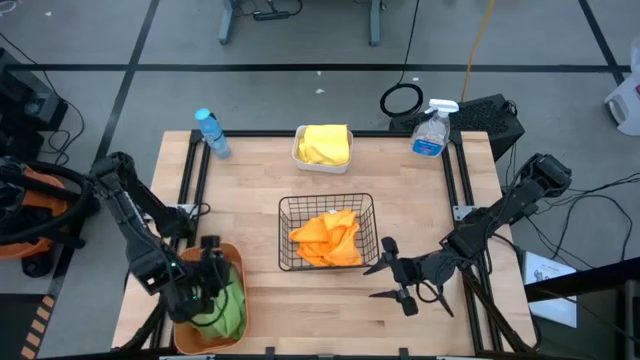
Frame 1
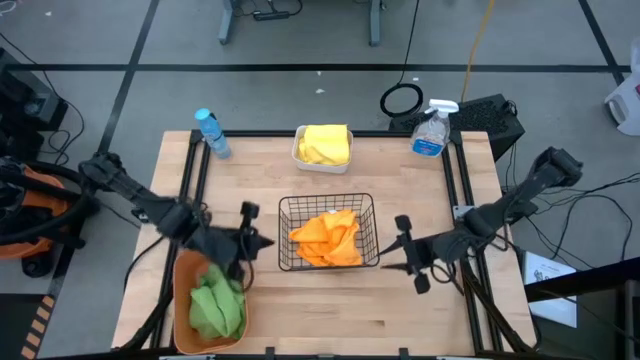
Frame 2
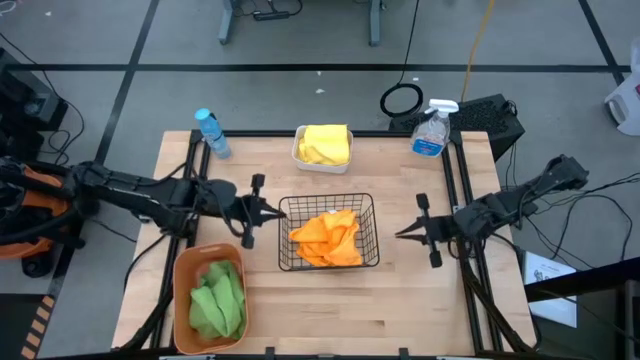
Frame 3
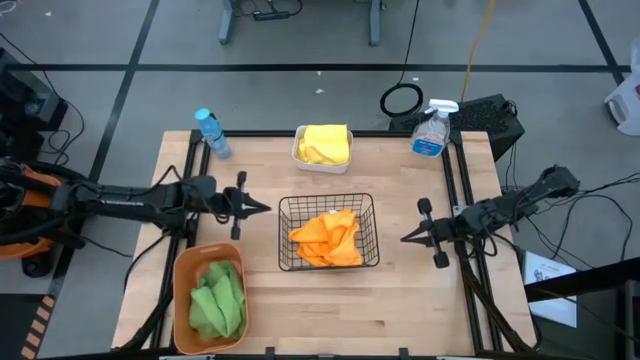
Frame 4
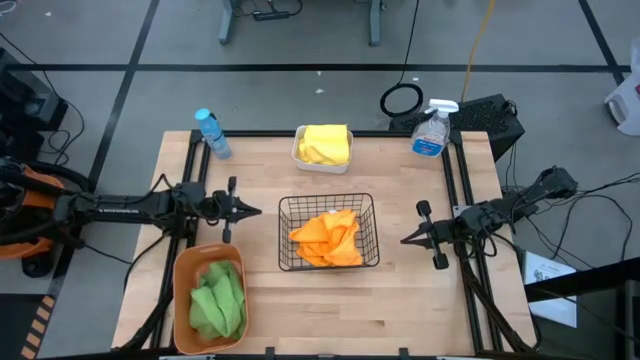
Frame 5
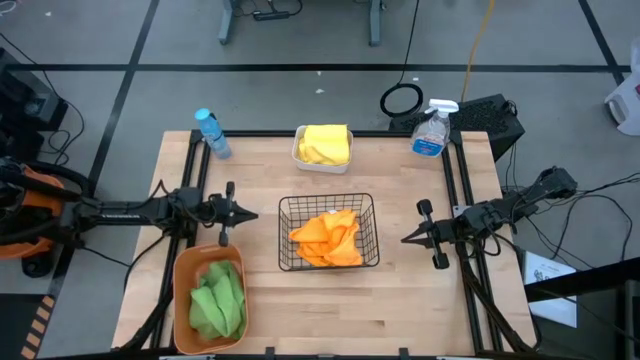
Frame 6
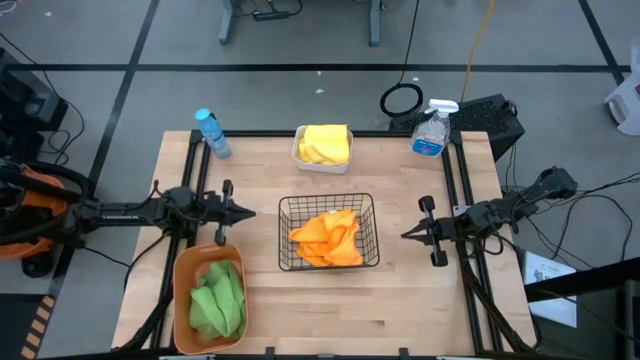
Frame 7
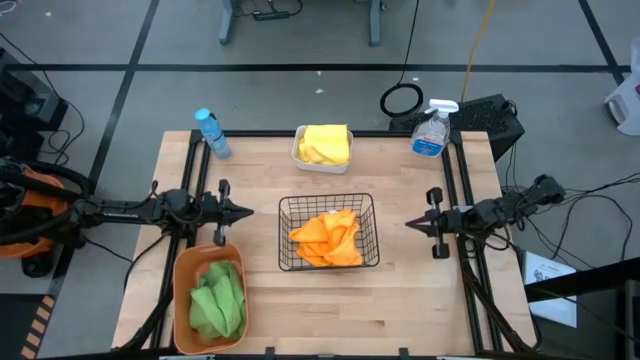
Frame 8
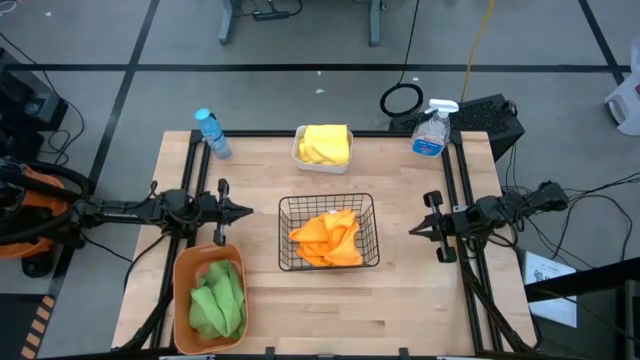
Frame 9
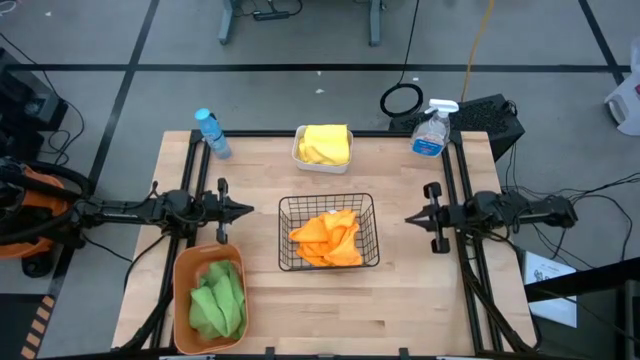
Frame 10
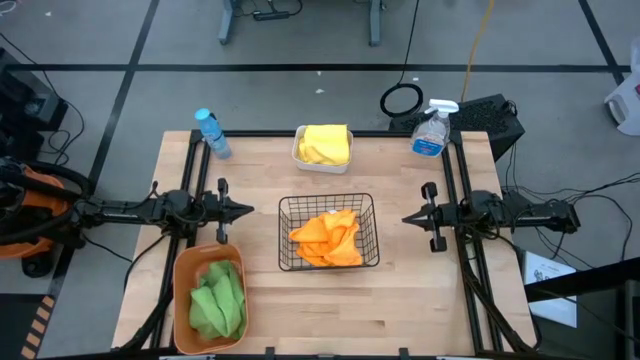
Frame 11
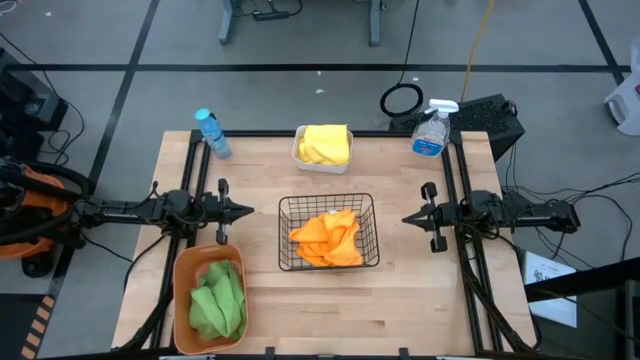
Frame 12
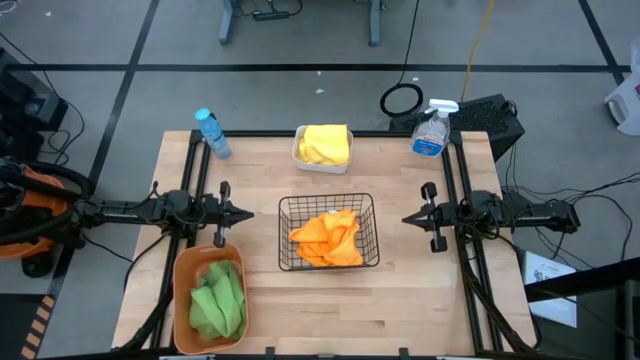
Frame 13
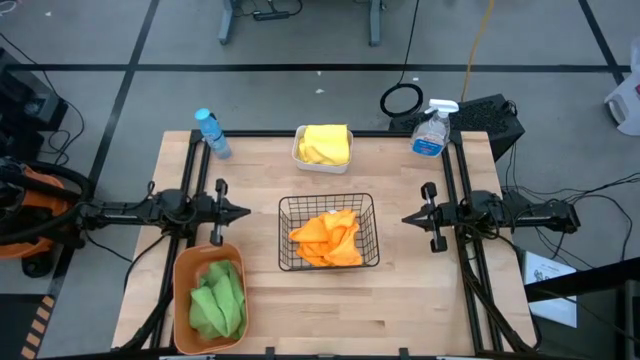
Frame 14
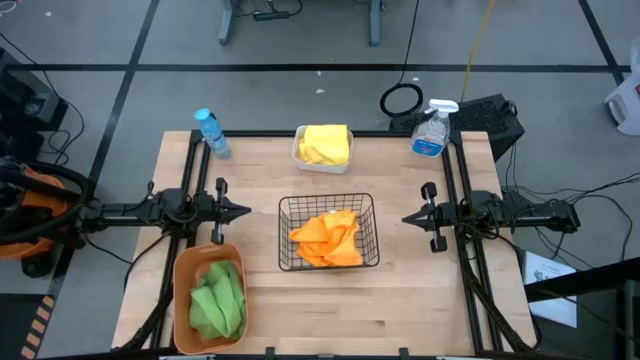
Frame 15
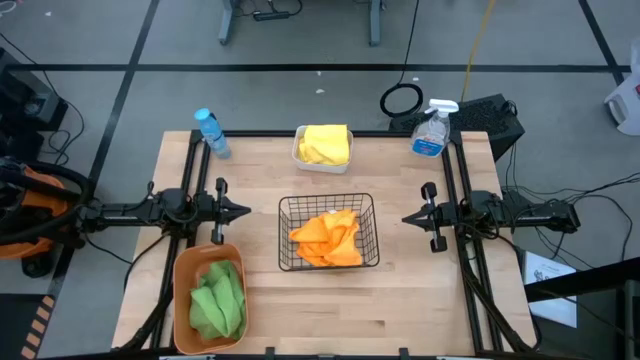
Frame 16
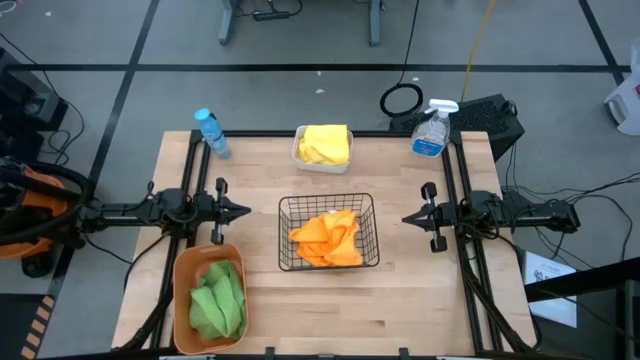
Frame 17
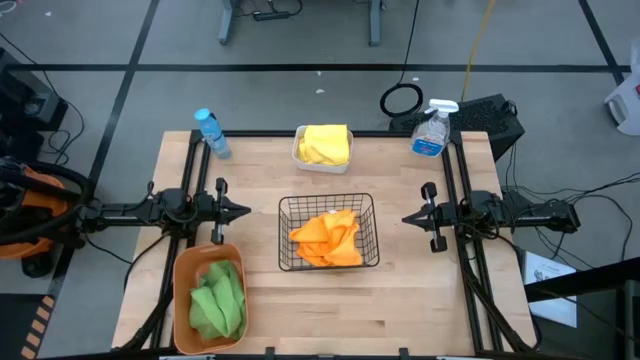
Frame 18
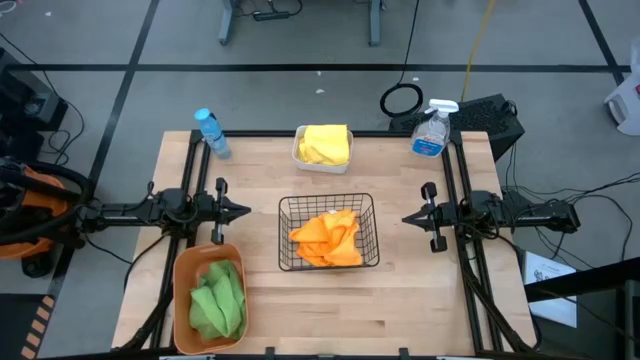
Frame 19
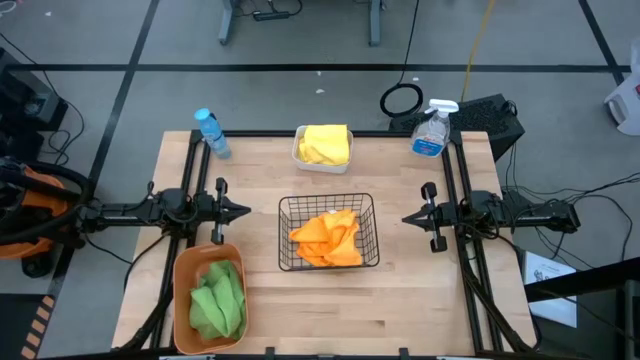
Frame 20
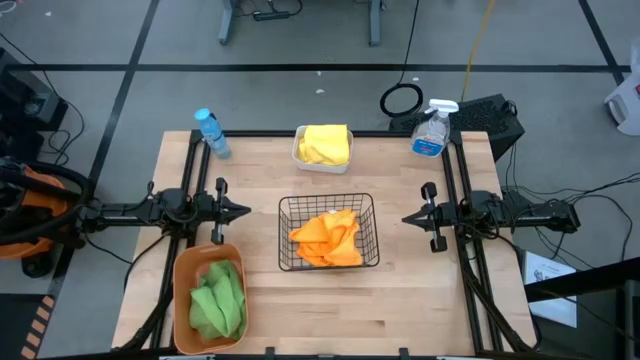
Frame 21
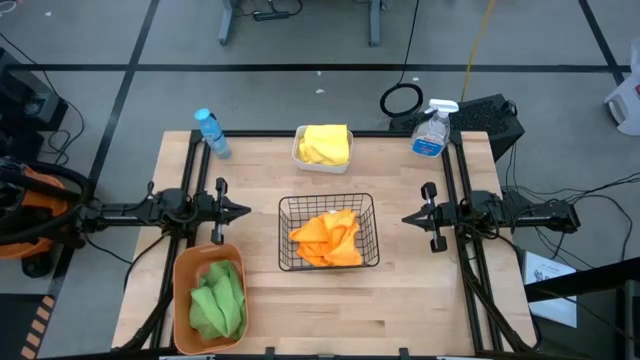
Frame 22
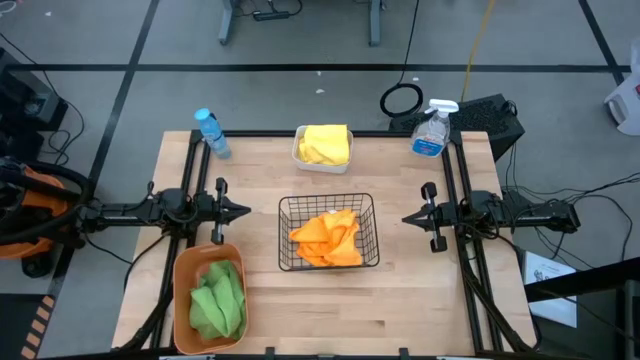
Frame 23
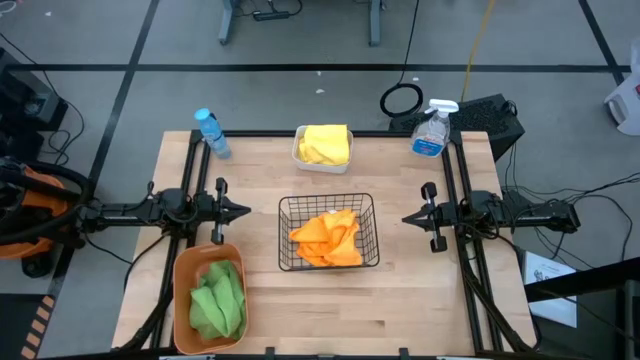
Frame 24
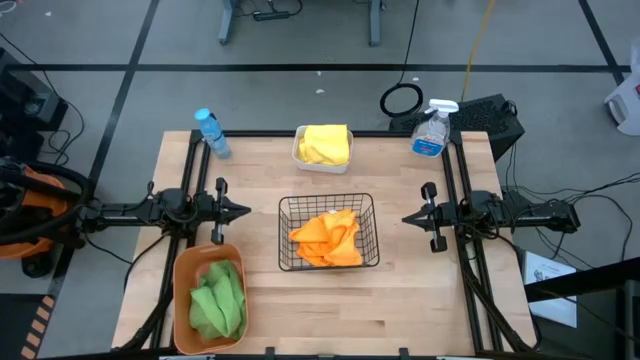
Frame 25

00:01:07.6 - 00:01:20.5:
Task: Sort microfiber towel by color & place in baskets
Return to Home Position

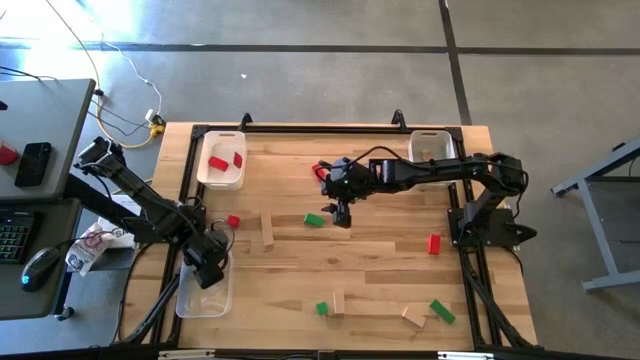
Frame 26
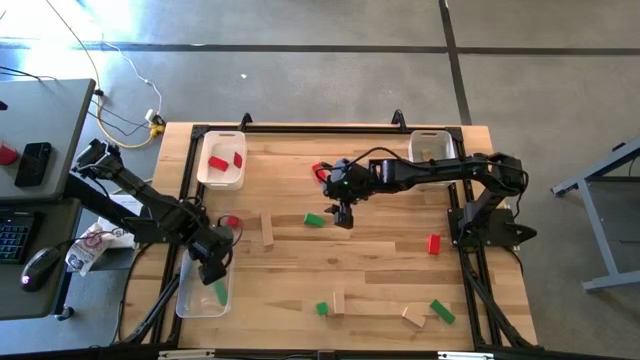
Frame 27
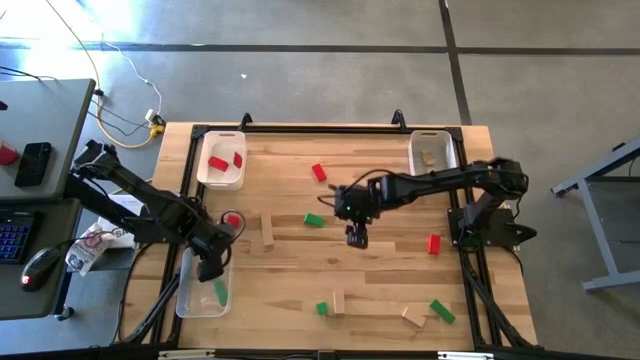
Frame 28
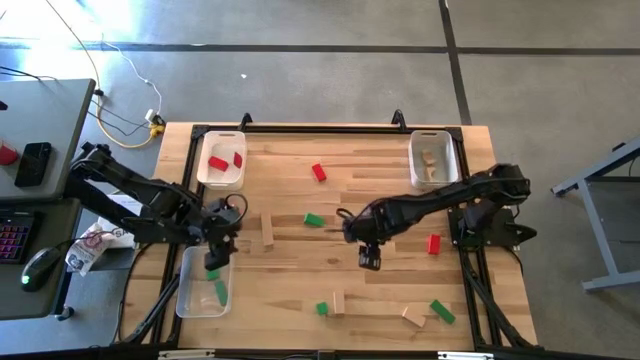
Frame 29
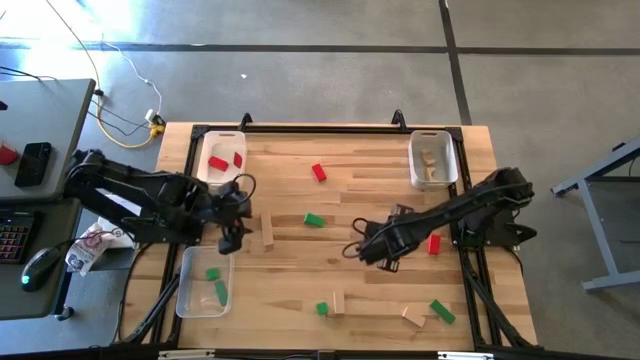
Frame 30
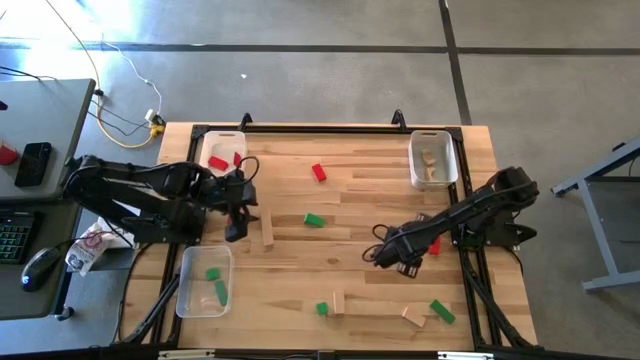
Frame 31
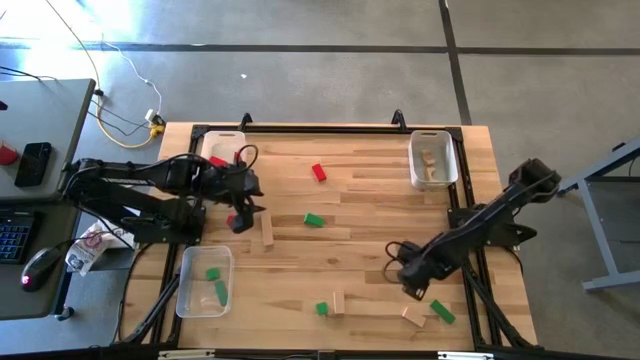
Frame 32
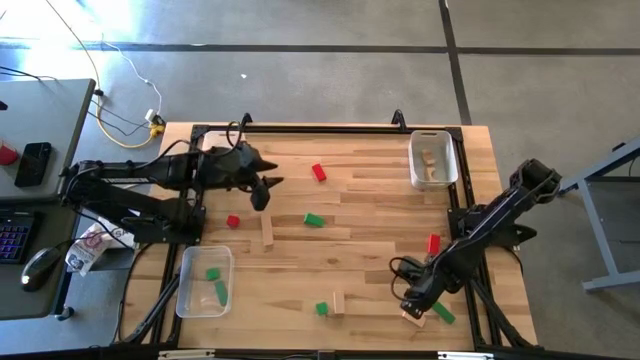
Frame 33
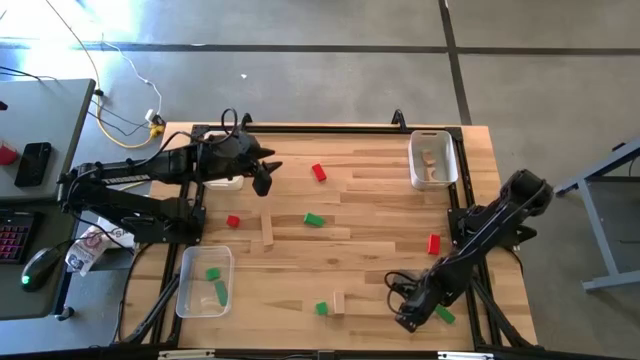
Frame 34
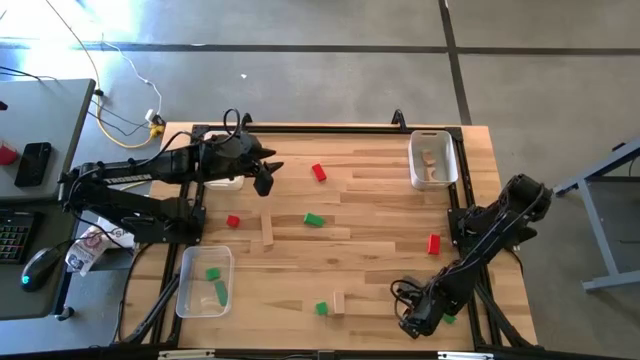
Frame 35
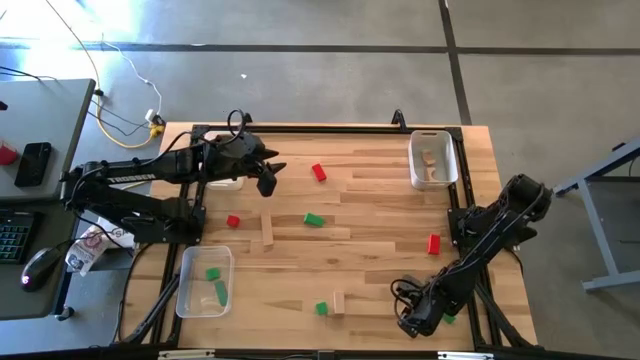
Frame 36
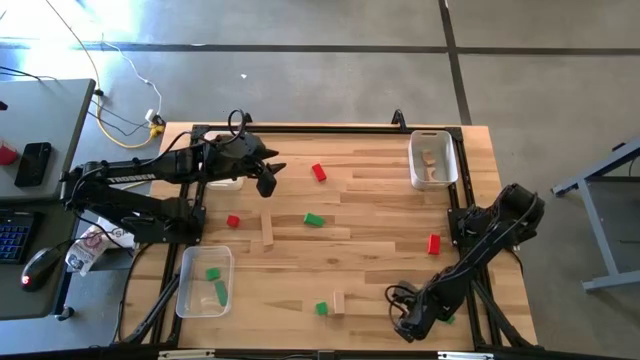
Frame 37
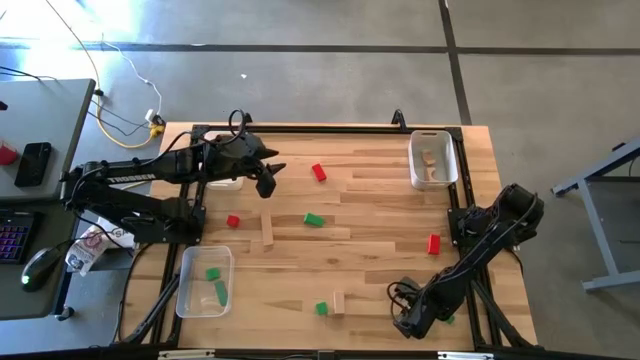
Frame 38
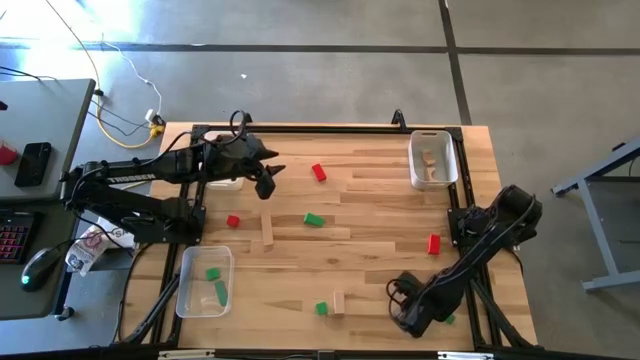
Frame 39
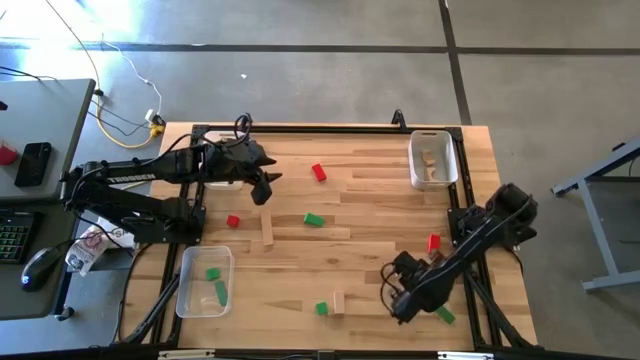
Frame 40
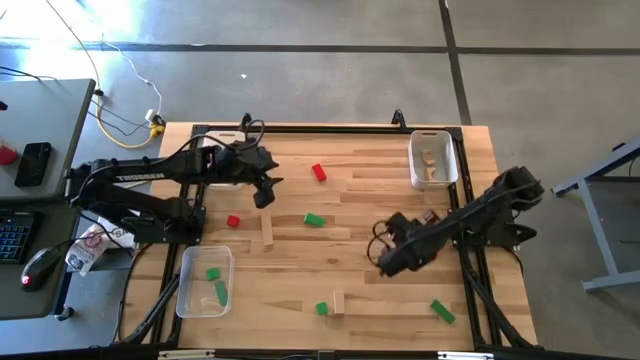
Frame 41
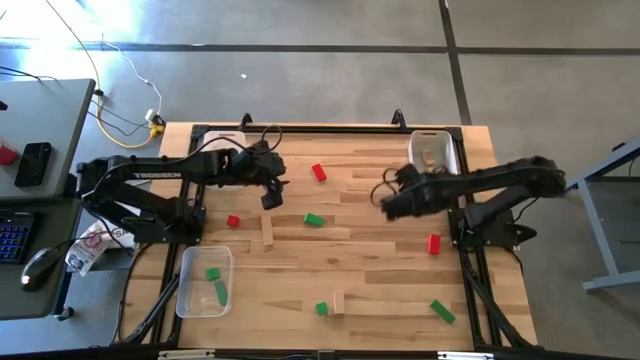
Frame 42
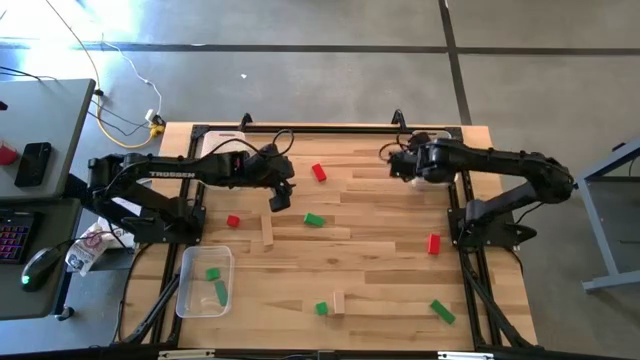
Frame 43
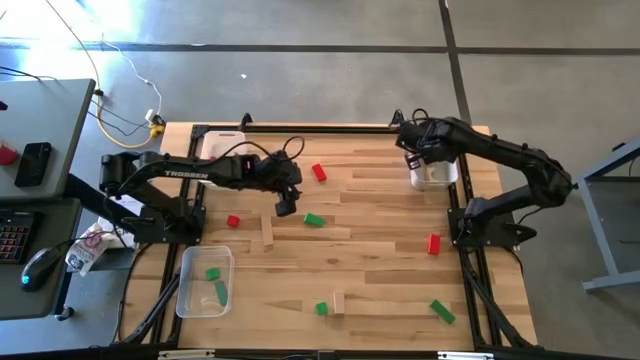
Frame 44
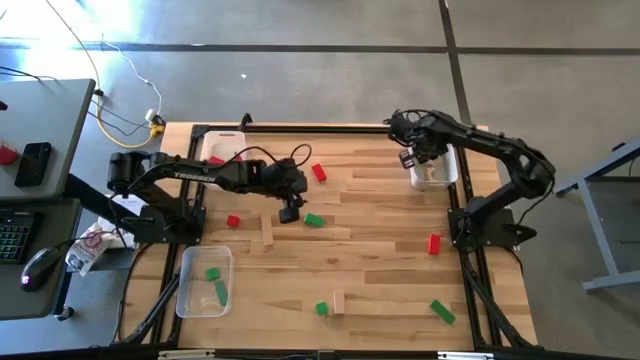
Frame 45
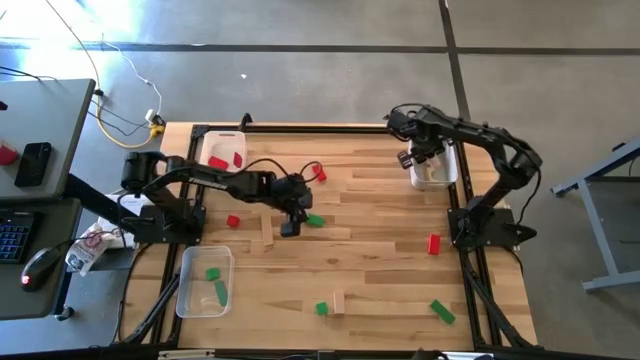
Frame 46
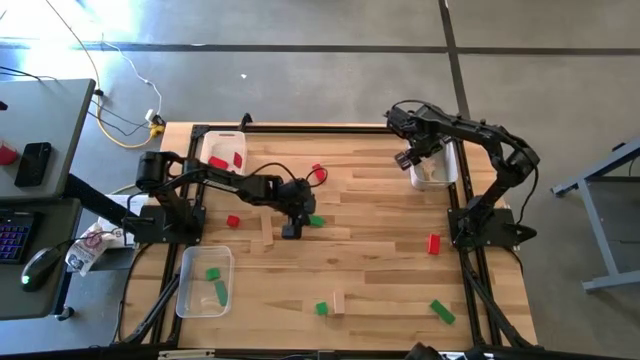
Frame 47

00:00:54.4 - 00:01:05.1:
Task: Sort & place blocks by color
Put the light brown block into the gray bin
